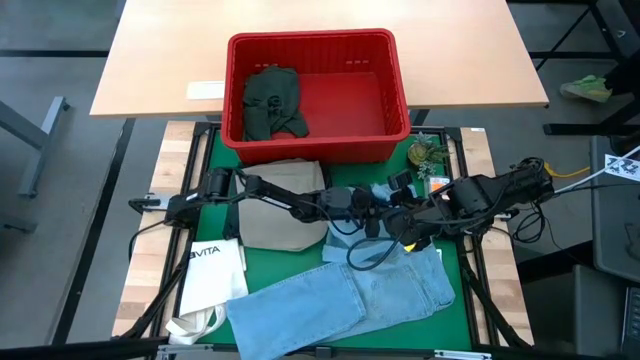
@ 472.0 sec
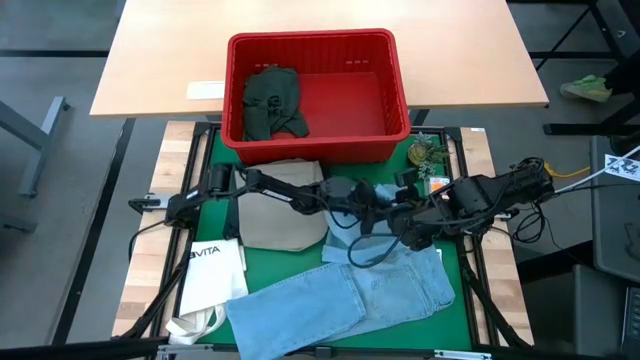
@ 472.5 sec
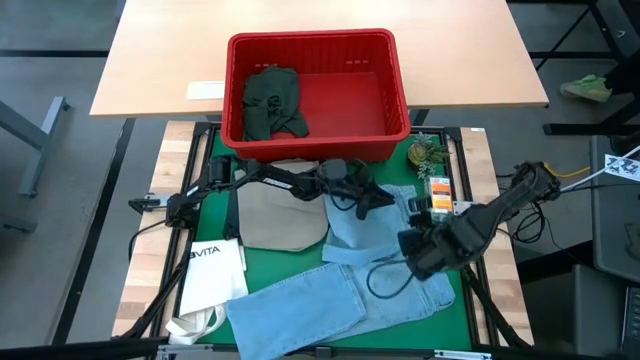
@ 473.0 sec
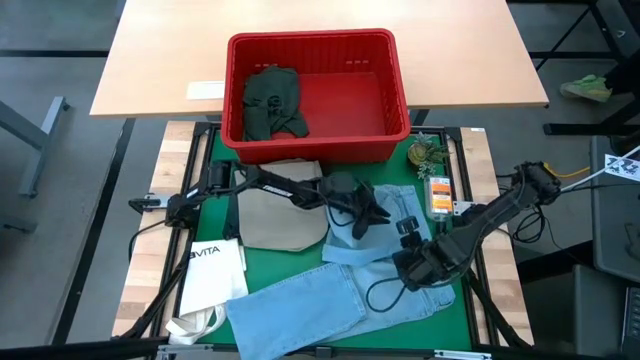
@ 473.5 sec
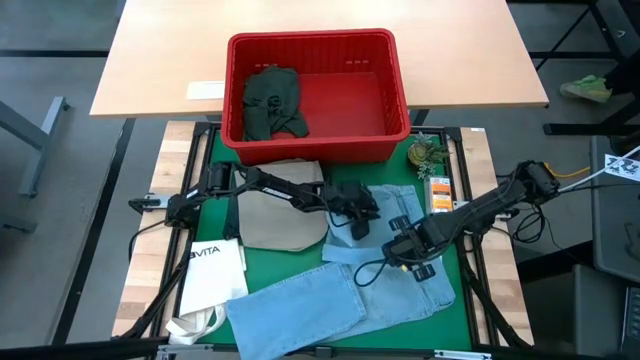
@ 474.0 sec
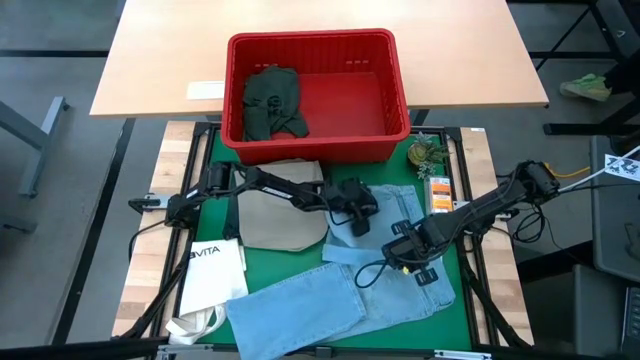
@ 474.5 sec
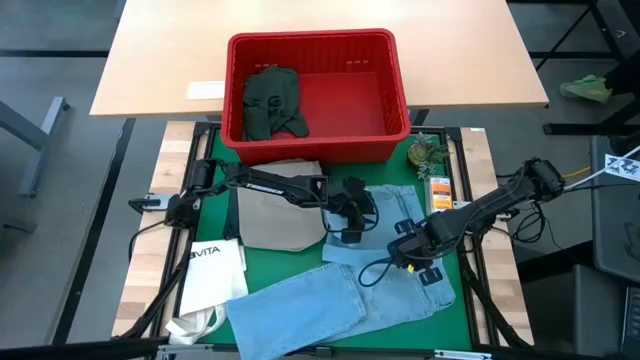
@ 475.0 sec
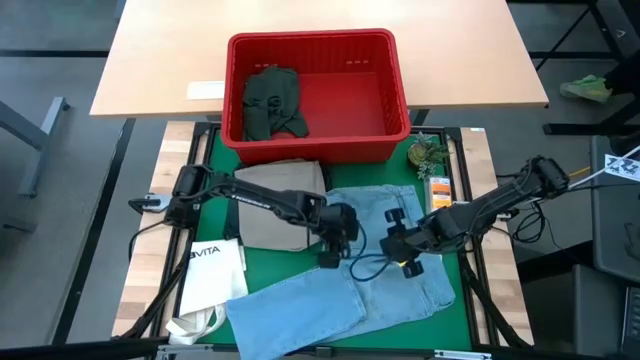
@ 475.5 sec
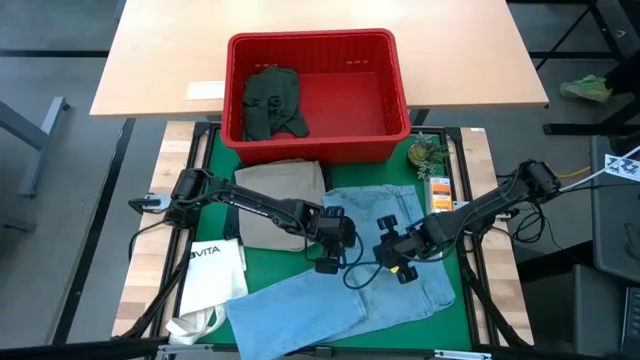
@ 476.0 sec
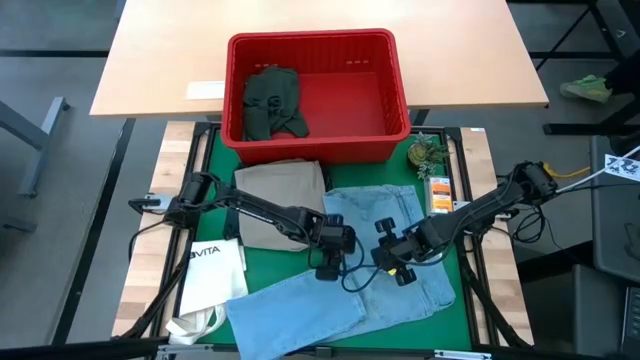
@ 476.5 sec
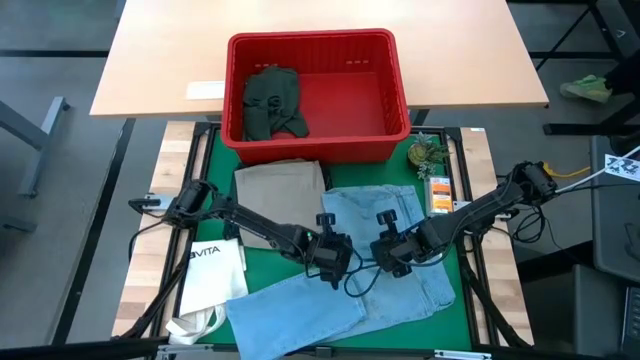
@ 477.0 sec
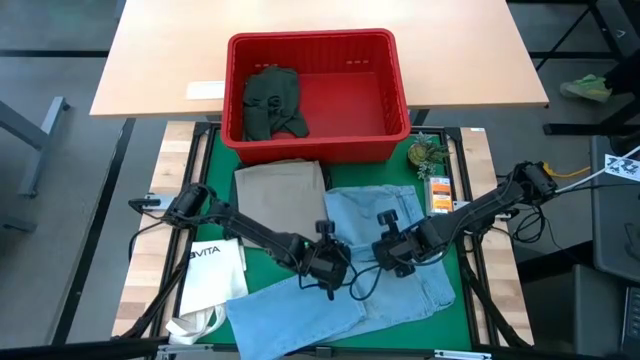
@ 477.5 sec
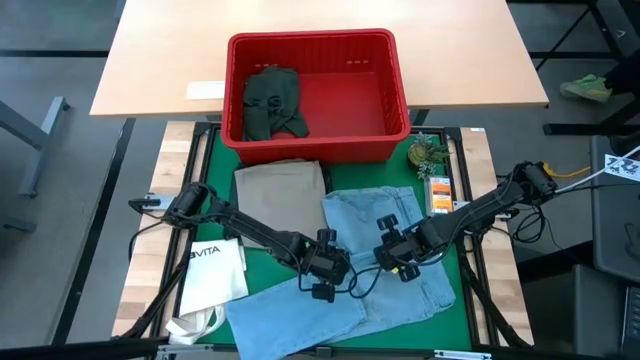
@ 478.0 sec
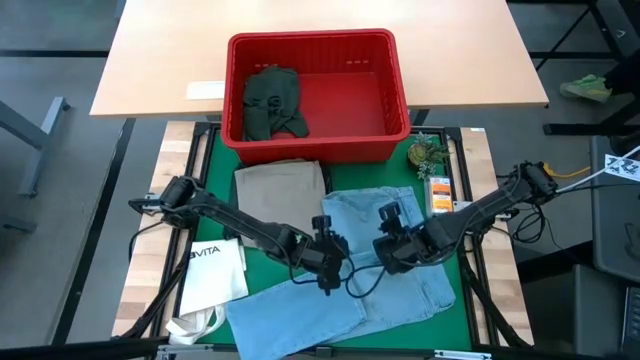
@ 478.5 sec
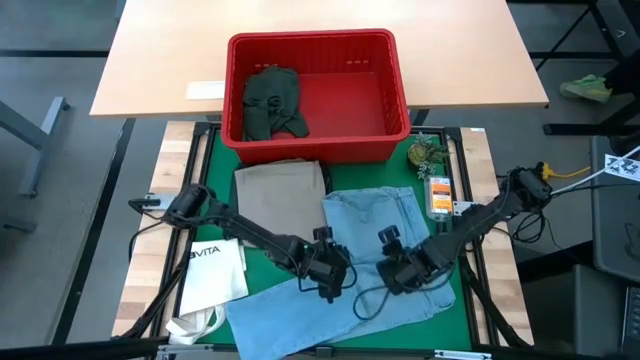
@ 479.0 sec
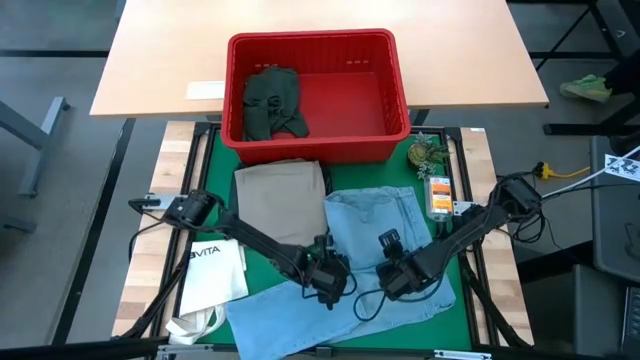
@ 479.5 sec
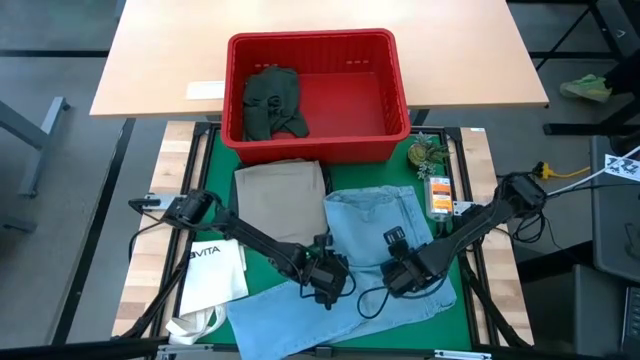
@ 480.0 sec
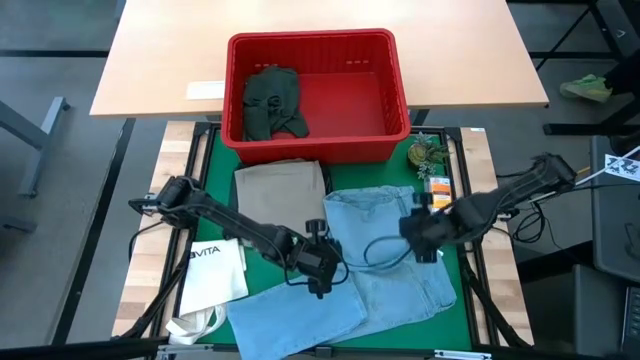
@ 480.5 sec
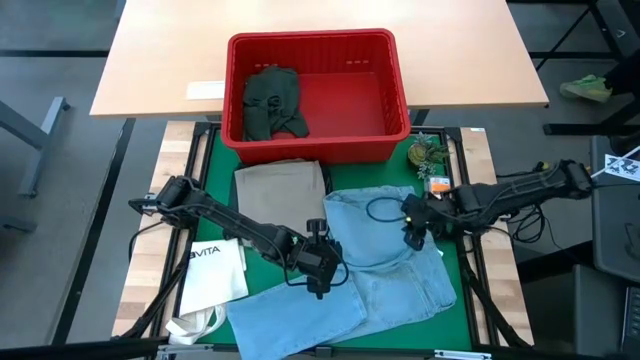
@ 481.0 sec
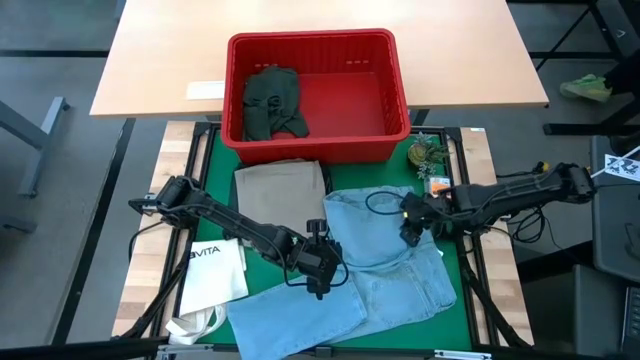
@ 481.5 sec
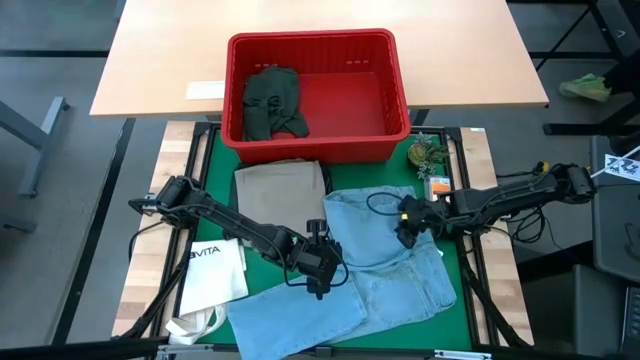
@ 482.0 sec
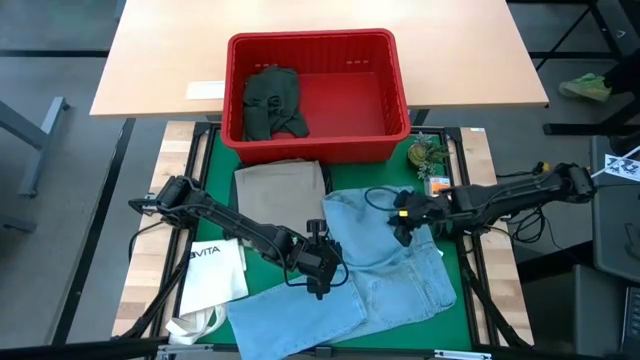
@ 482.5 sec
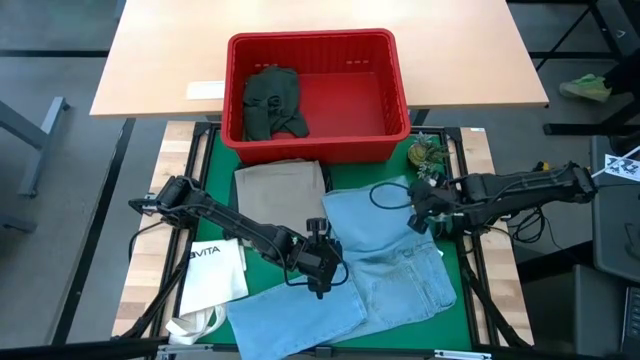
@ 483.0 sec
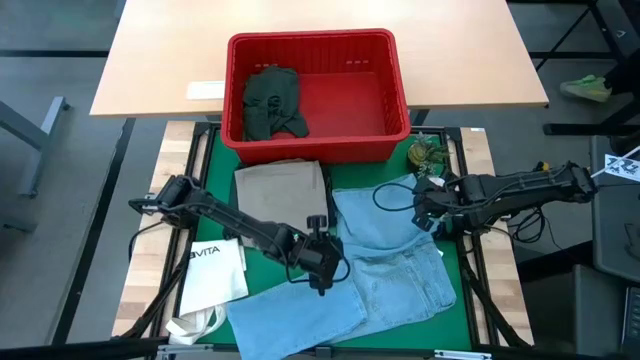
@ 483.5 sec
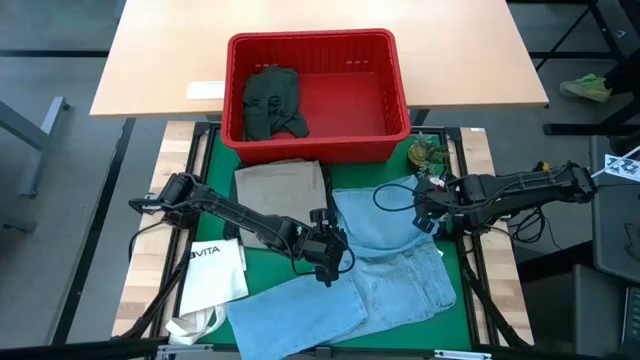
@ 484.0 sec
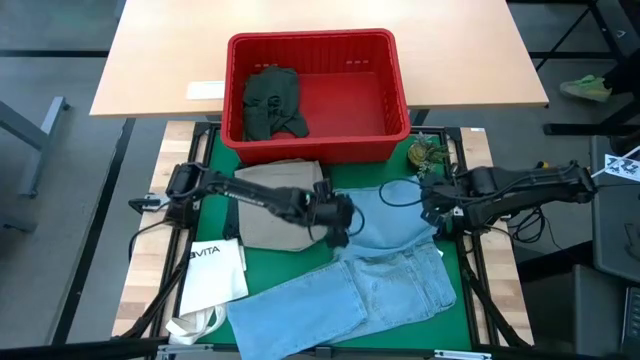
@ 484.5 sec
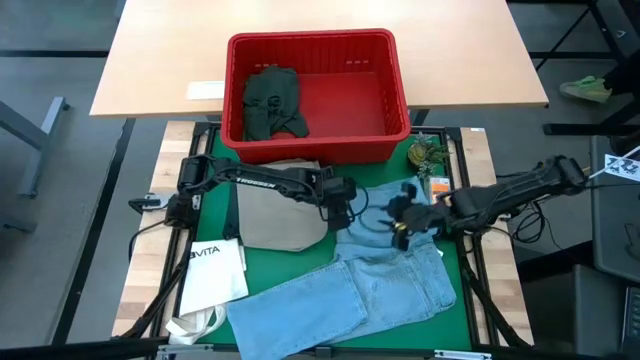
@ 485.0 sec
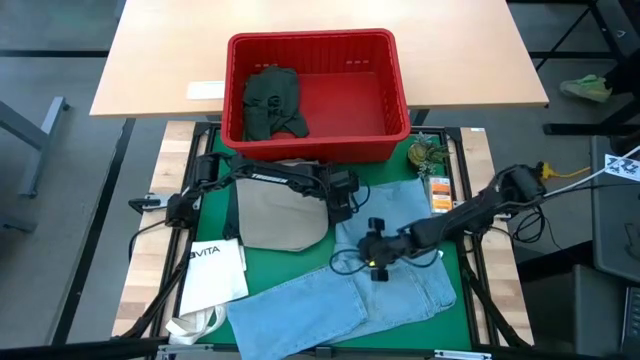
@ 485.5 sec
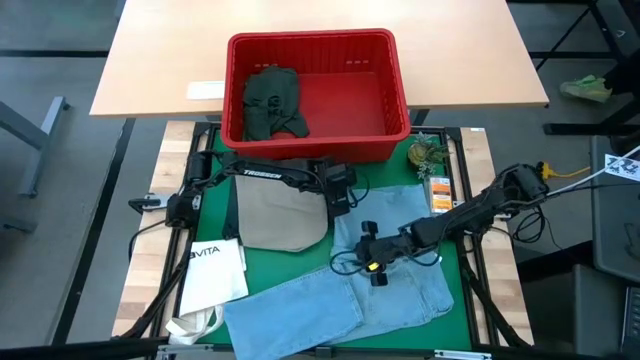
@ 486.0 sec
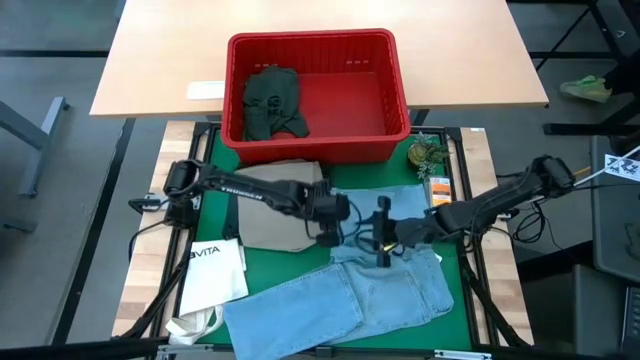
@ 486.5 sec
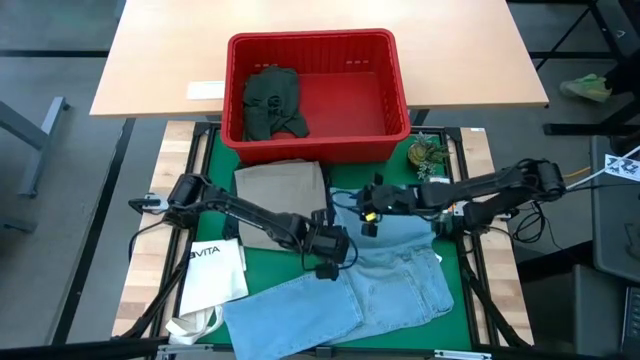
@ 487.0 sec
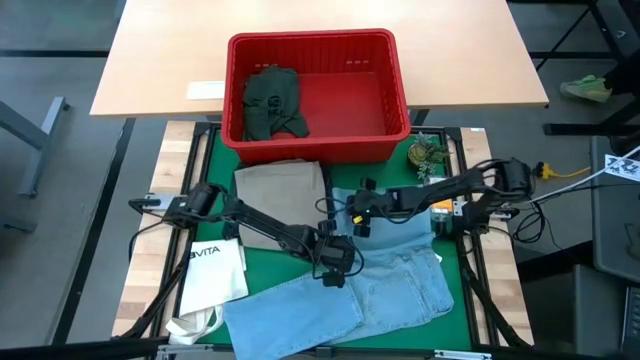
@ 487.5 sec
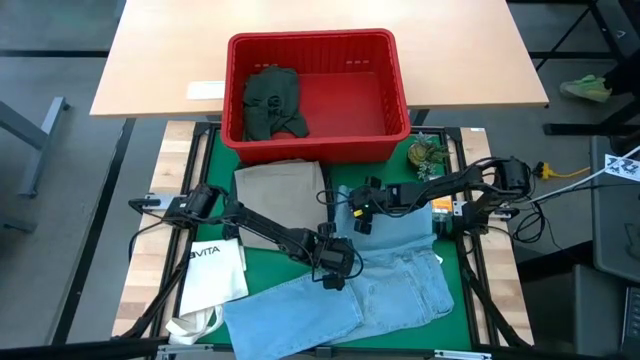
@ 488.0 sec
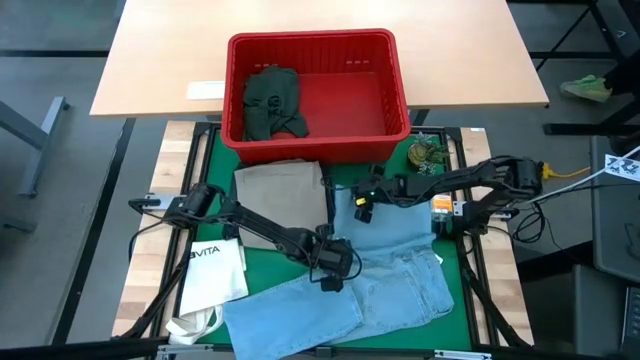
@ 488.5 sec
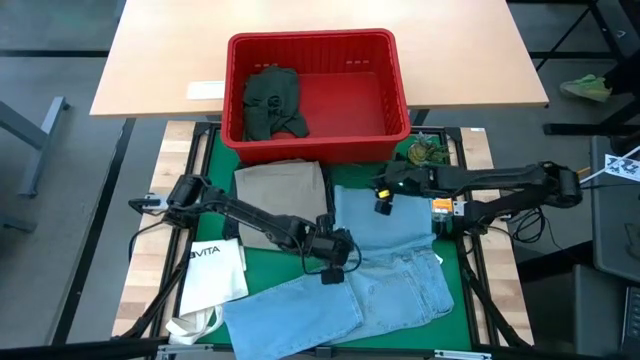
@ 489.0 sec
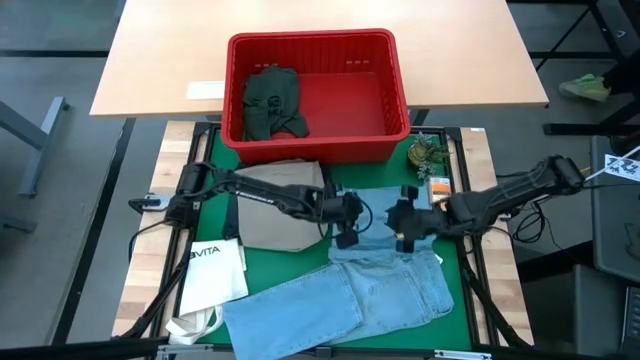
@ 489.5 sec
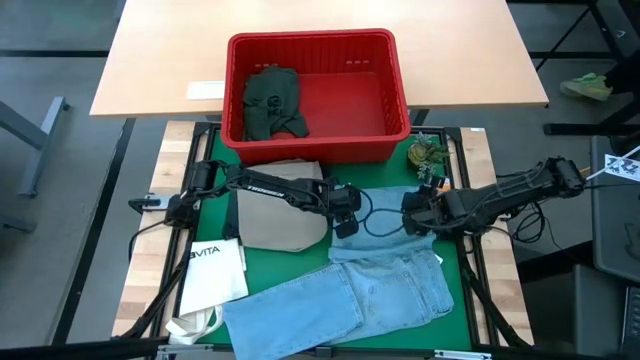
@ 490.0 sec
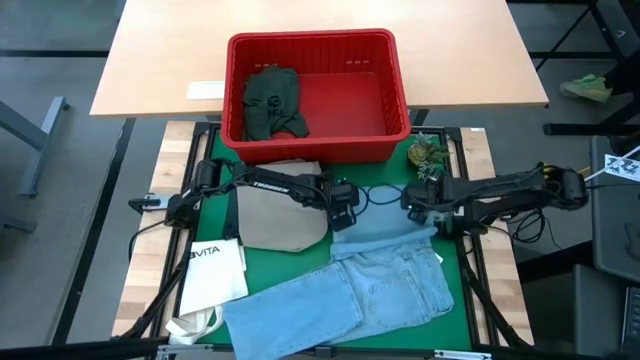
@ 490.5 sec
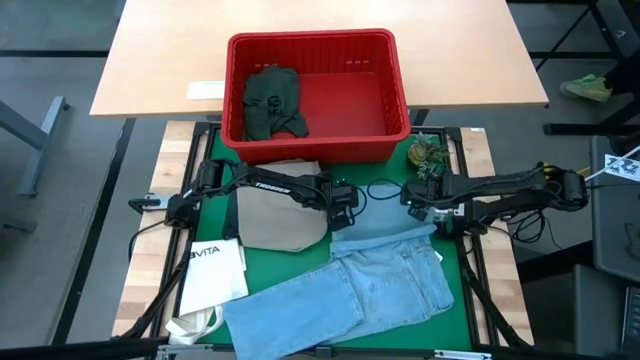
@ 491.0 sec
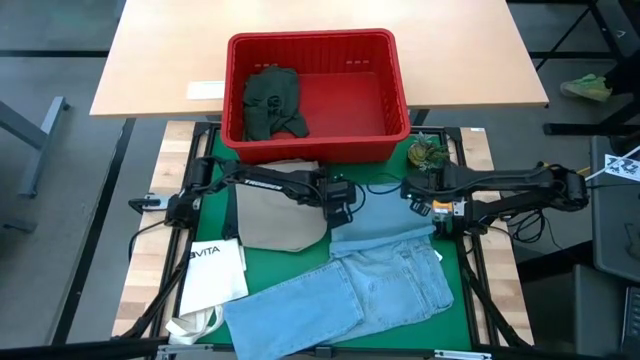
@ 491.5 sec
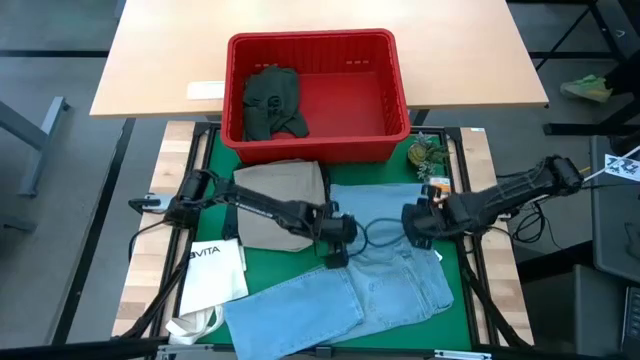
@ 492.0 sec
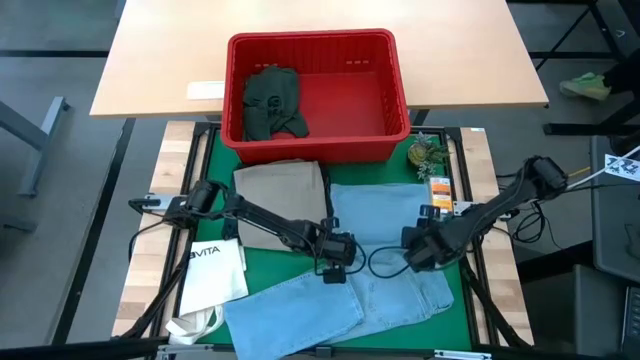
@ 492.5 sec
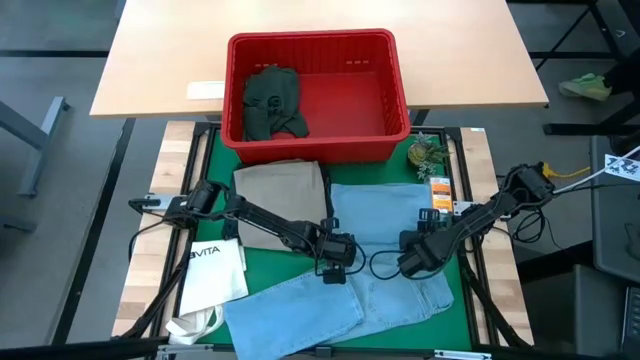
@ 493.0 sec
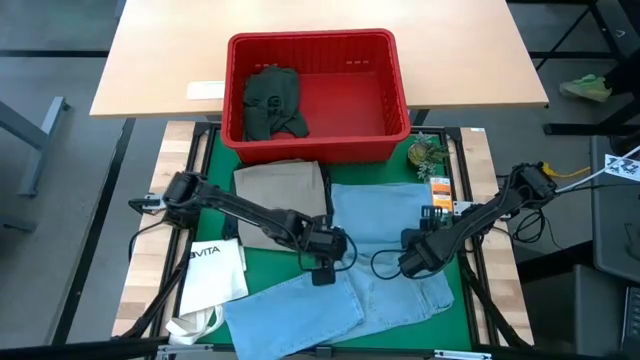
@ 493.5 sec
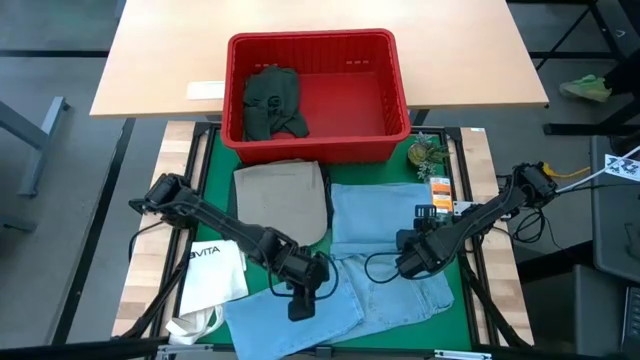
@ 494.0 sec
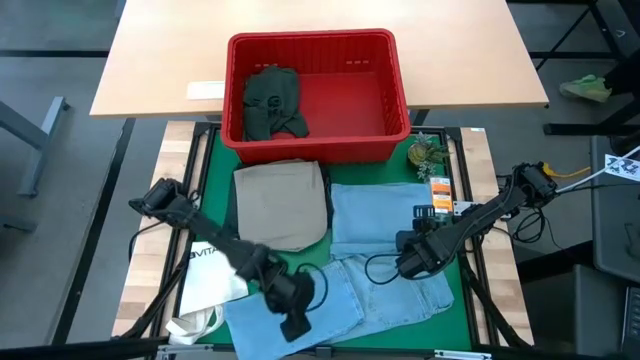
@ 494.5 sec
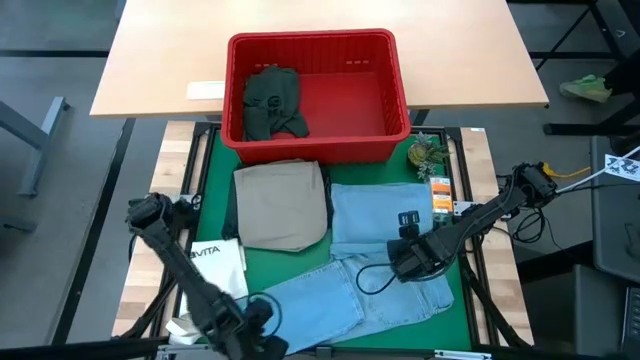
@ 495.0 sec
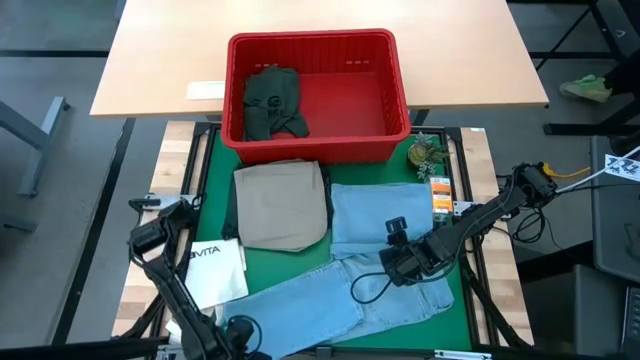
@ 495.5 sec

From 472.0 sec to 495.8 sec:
Task: Fold Laundry from Bin
Fold the light blue pants
